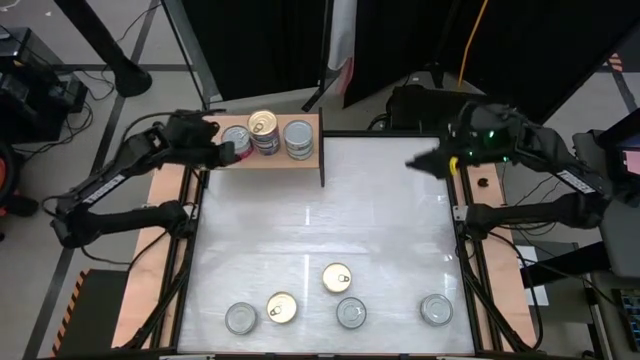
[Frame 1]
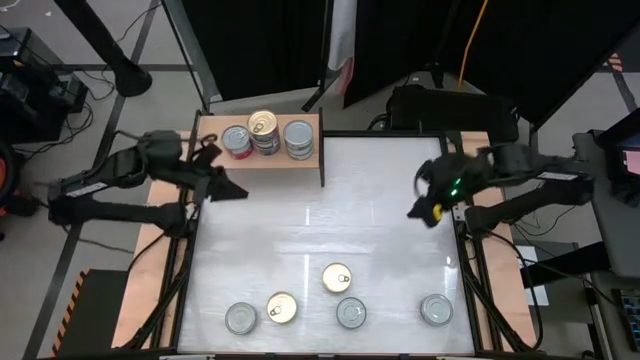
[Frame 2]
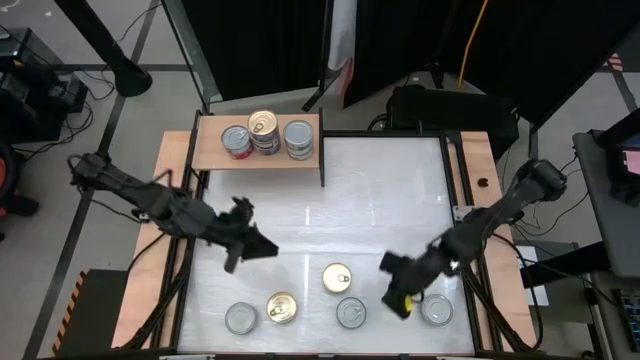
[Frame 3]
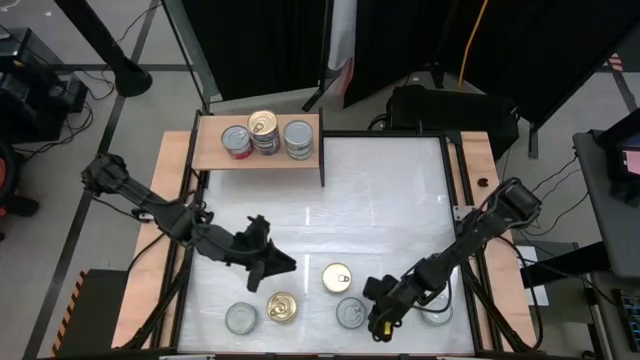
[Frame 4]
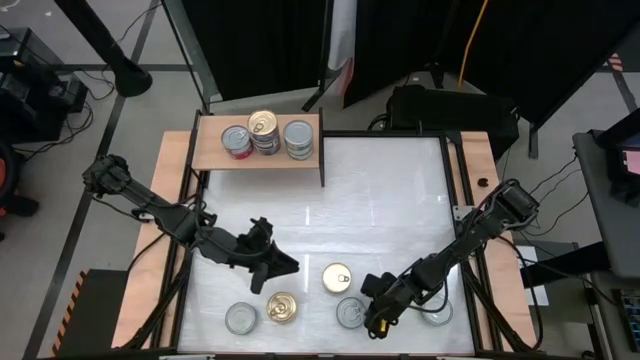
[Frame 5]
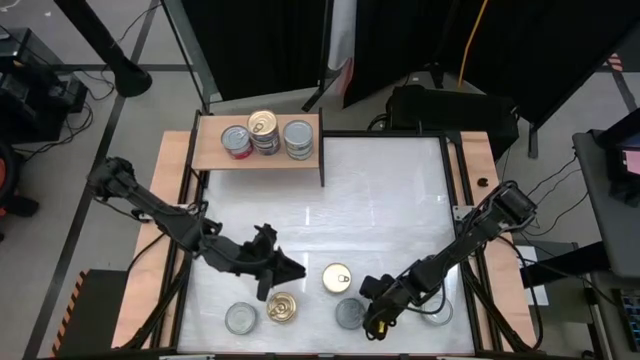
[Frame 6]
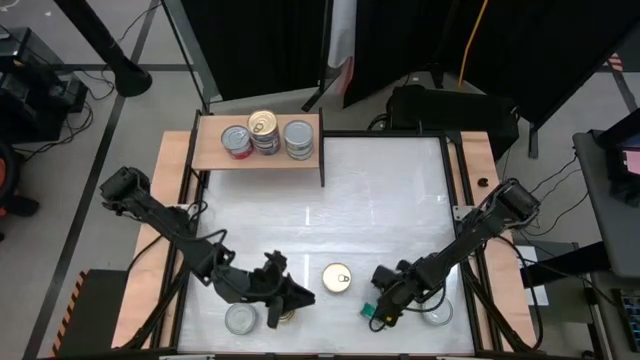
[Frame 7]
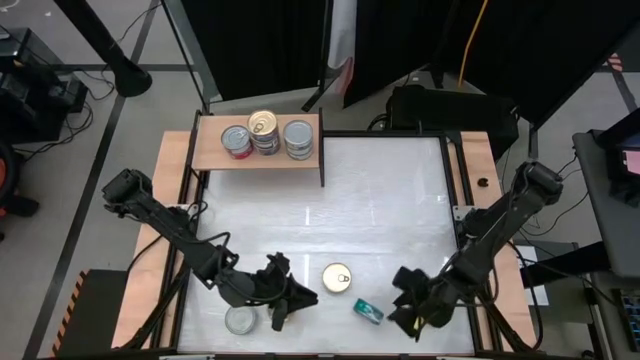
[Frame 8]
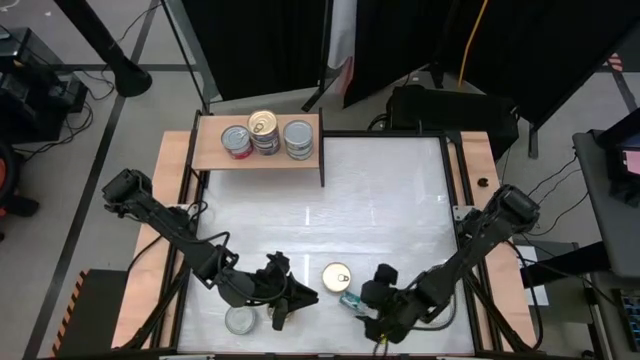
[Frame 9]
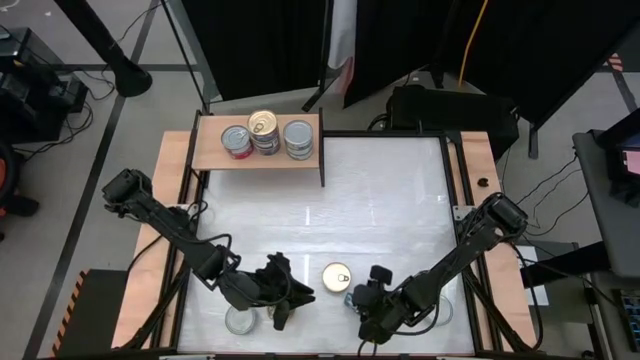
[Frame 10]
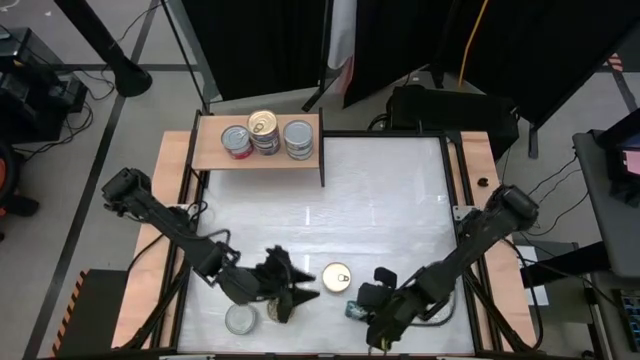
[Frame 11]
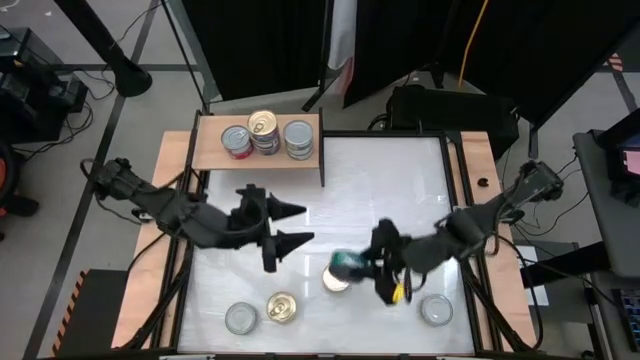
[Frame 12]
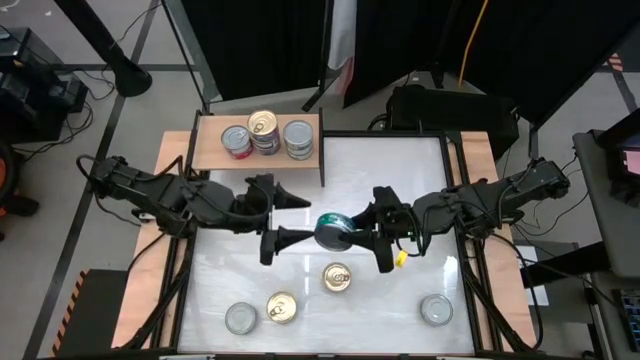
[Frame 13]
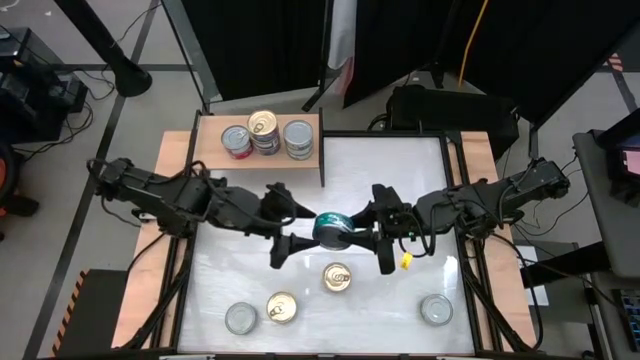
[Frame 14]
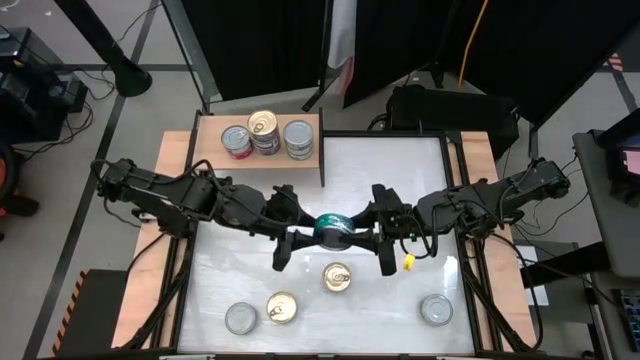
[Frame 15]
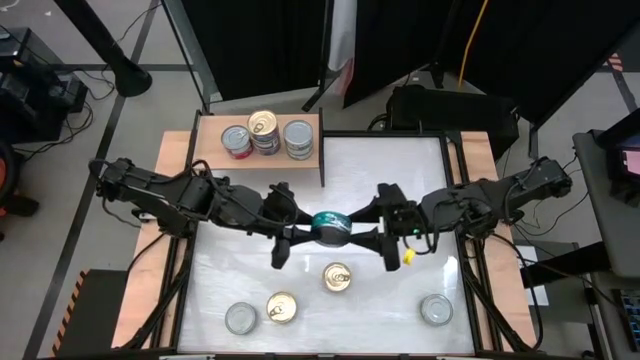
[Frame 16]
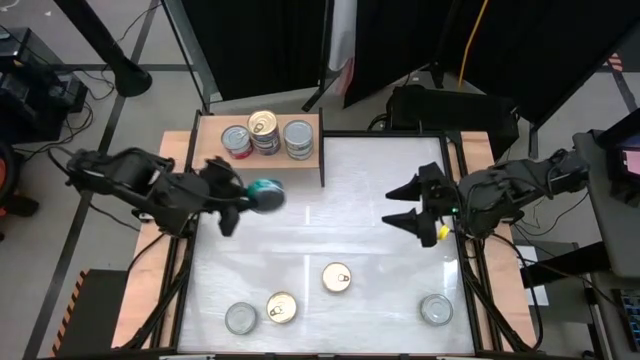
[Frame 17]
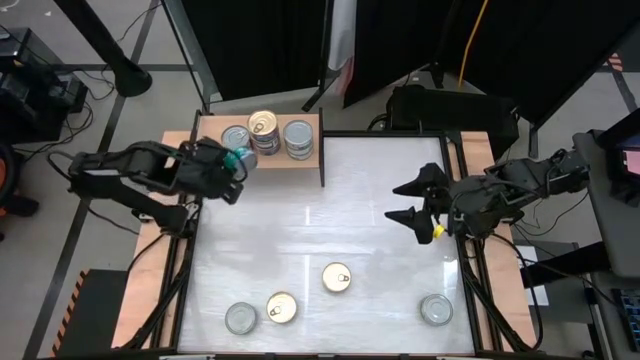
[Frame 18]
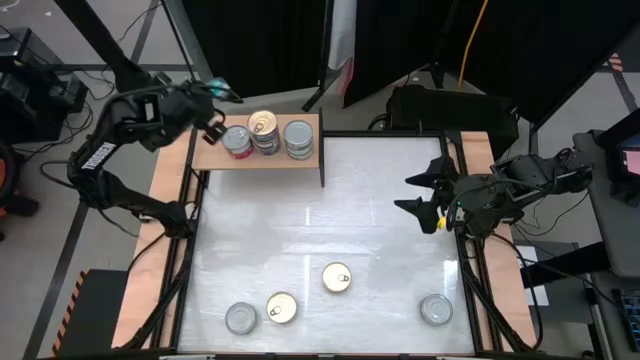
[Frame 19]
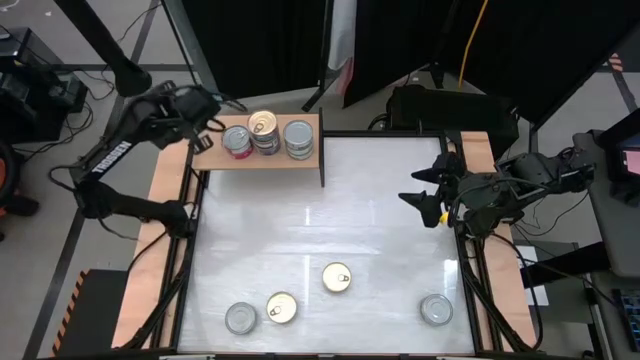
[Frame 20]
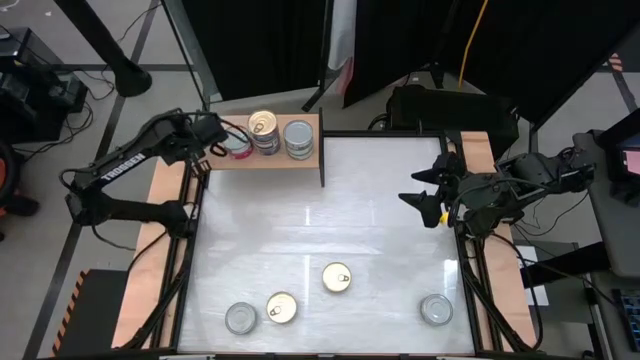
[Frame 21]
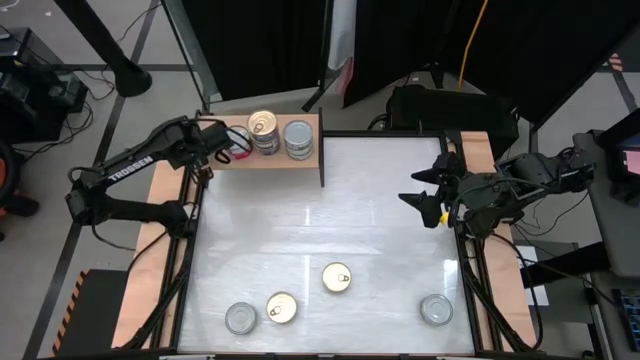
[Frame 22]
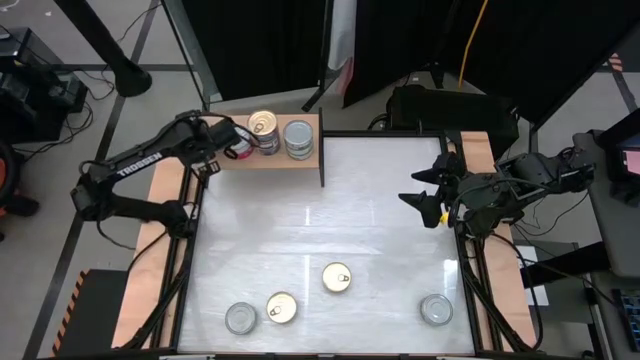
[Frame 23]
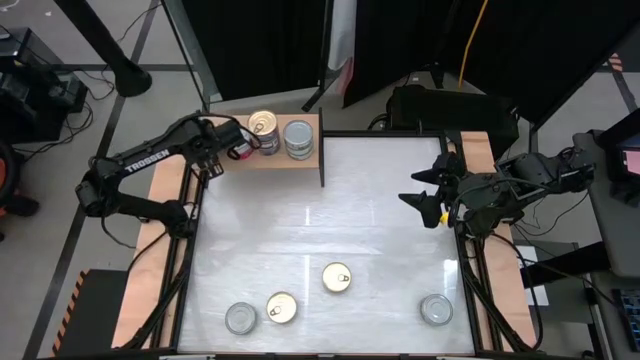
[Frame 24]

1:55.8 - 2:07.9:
Task: Stack canned seafood by type on shelf
Put the green blue tuna can on the shelf

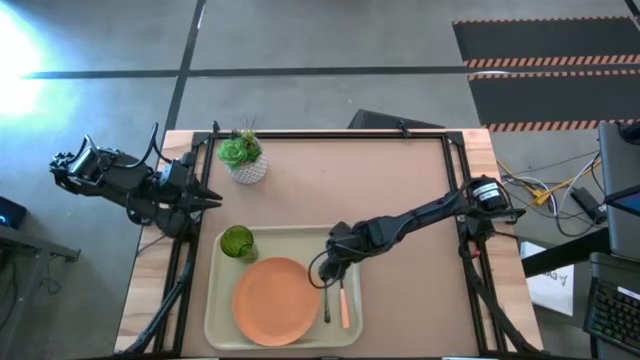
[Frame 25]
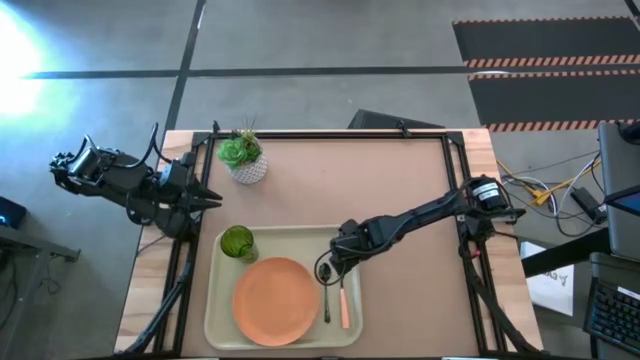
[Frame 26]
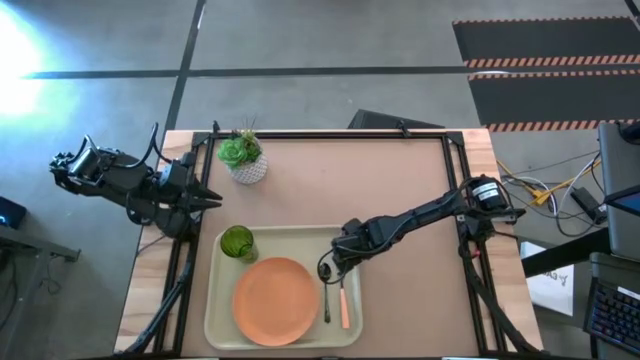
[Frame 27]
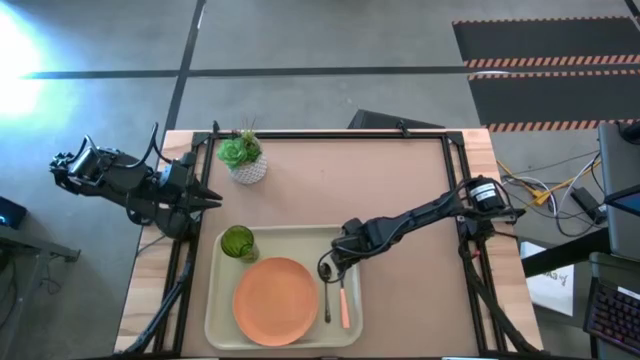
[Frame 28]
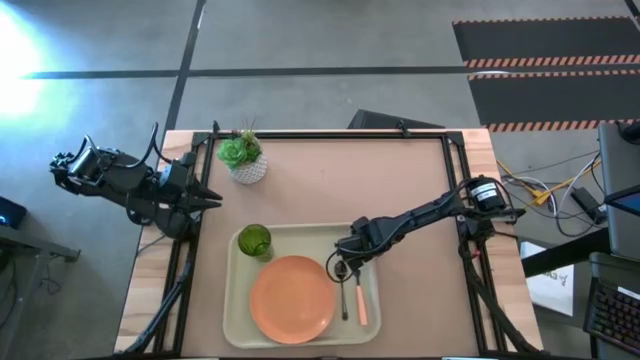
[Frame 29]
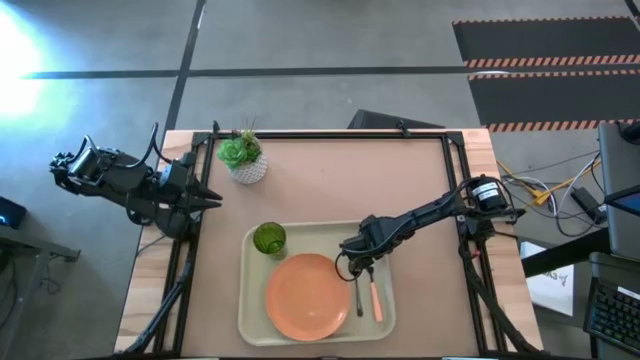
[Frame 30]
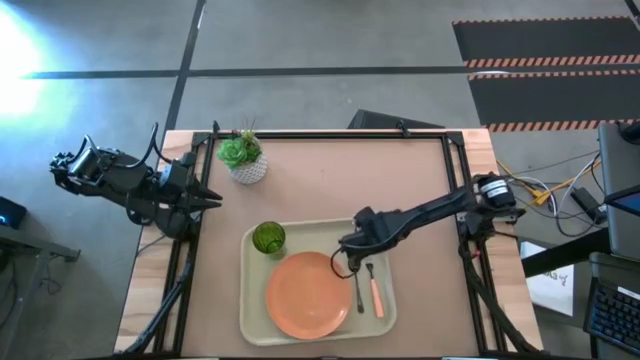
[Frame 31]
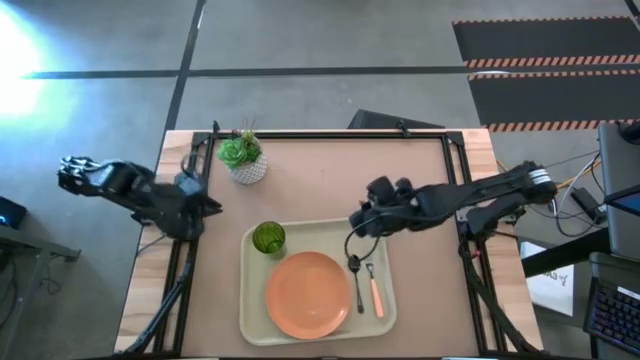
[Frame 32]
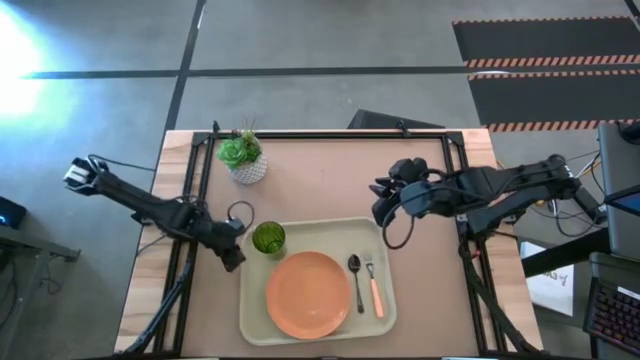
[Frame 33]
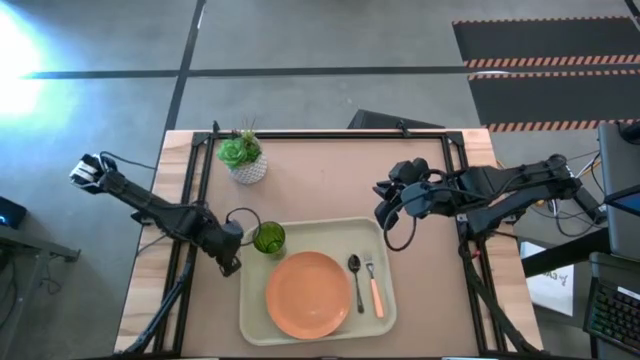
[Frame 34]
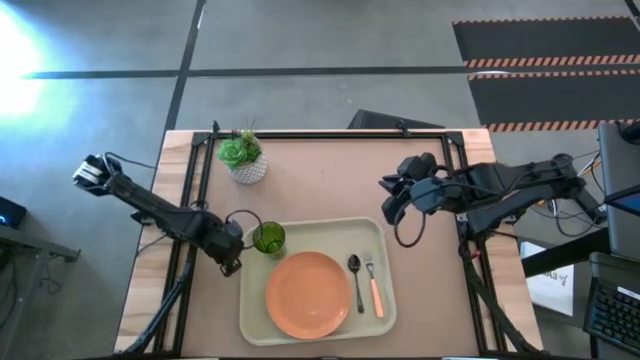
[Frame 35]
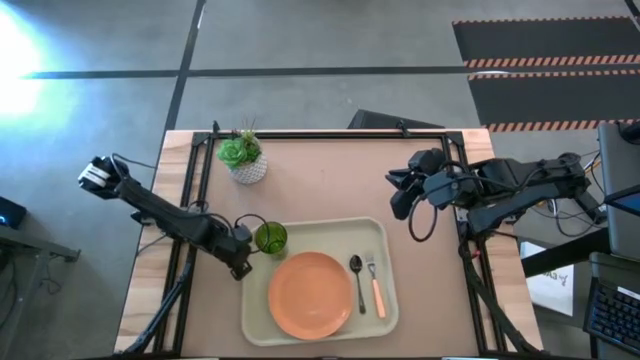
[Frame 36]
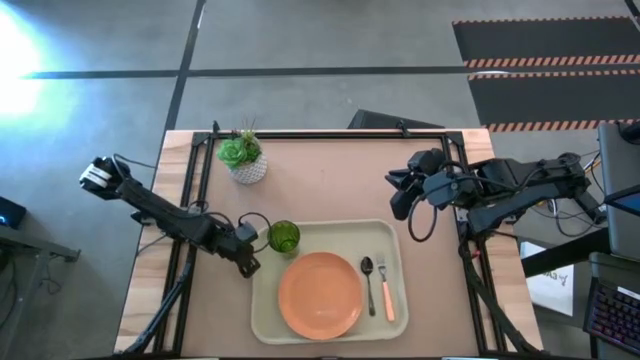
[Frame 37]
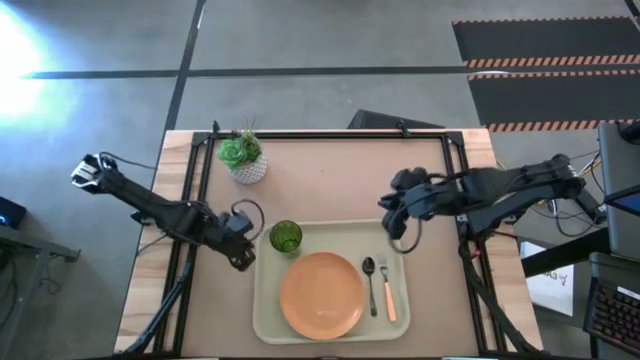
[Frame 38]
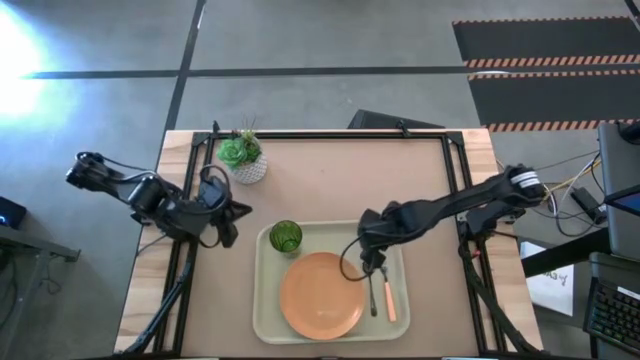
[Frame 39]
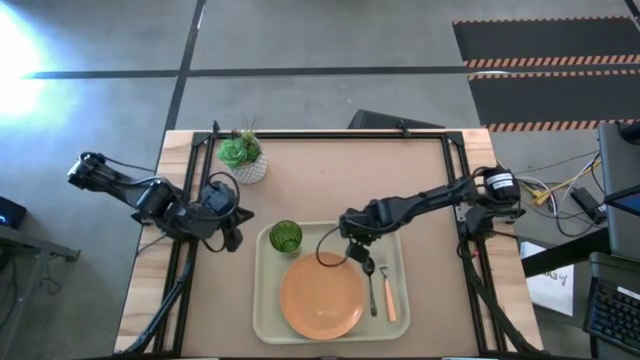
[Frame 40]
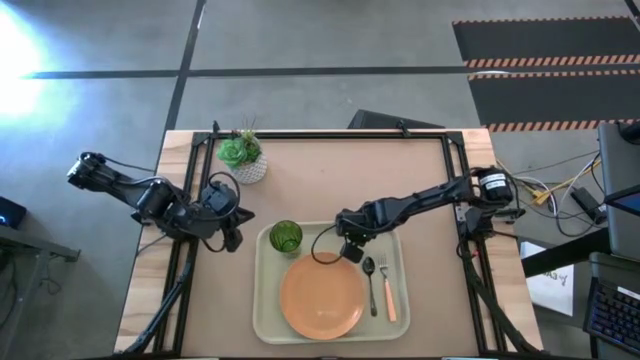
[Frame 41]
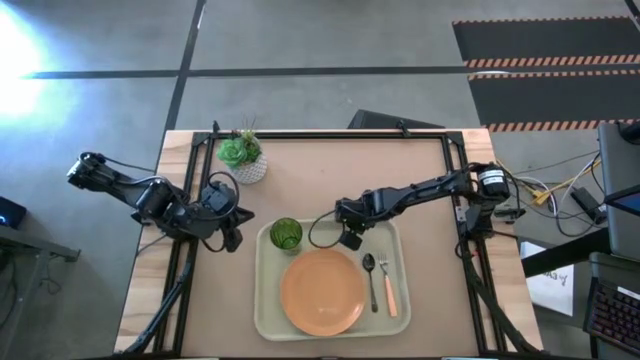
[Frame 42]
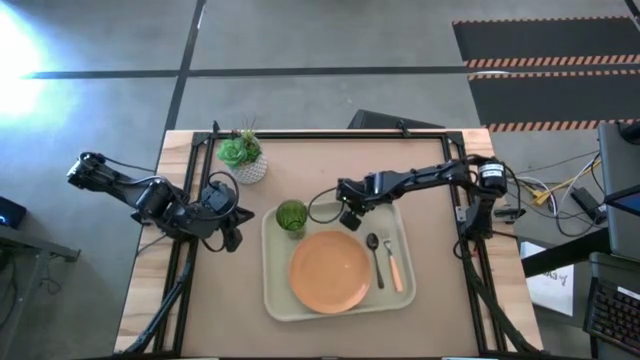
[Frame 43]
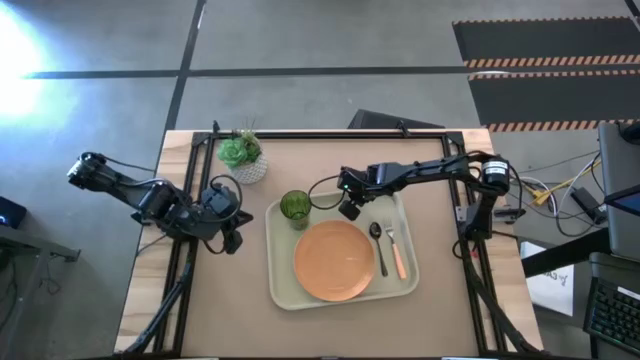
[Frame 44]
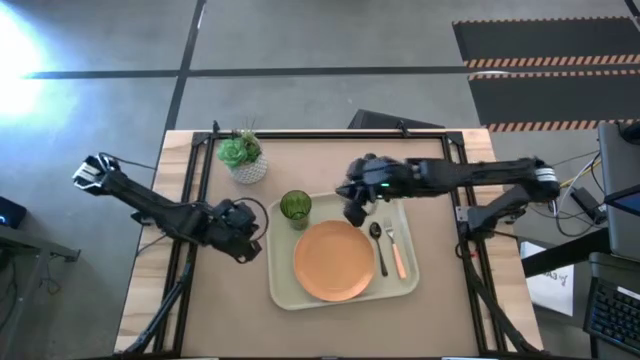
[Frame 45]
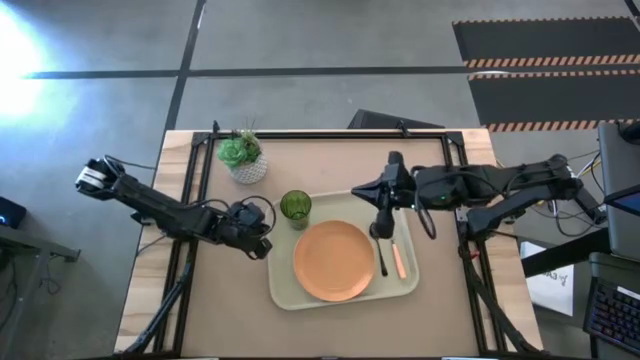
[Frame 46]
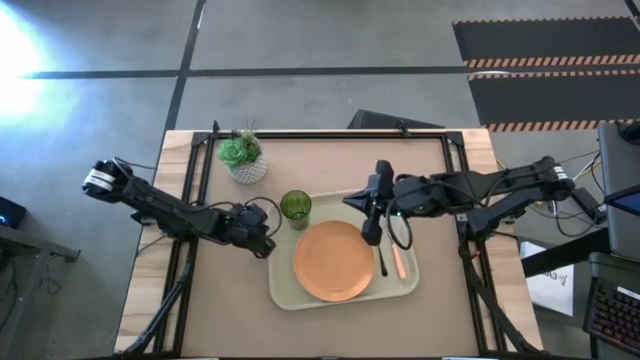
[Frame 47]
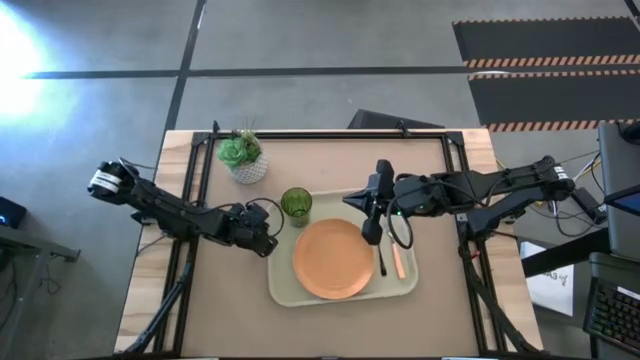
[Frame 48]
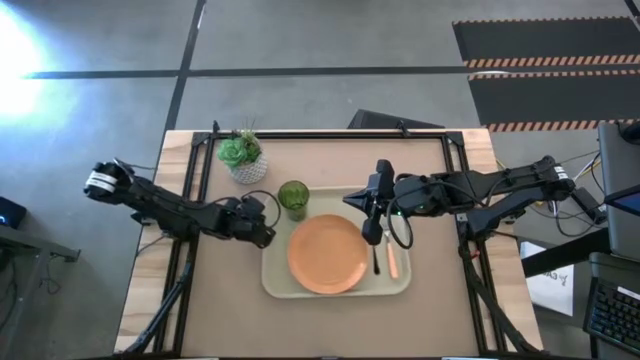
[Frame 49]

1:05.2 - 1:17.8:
Task: Pick and place plate/cup/fork/spoon on tray
Move the white tray to the center of the table
